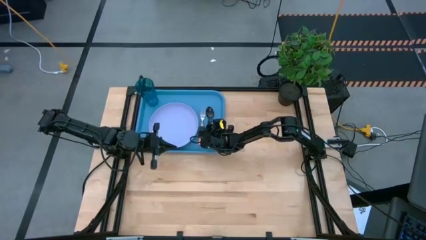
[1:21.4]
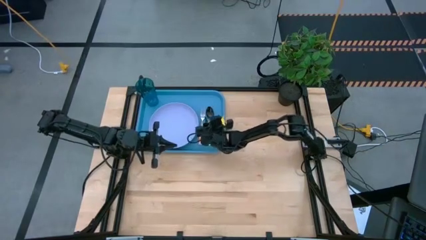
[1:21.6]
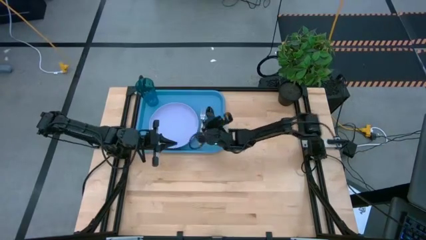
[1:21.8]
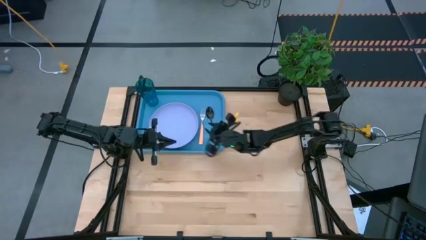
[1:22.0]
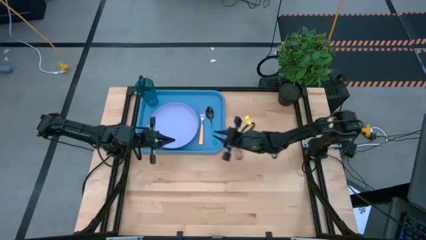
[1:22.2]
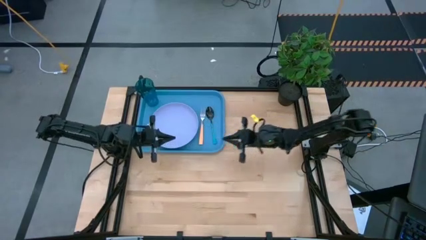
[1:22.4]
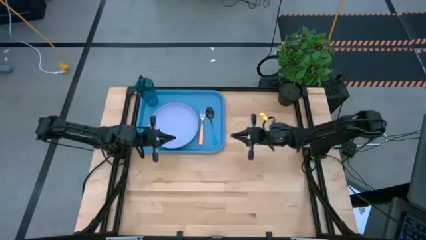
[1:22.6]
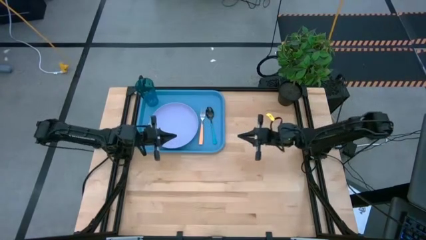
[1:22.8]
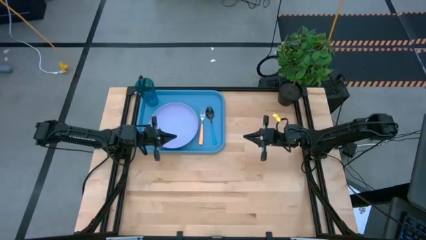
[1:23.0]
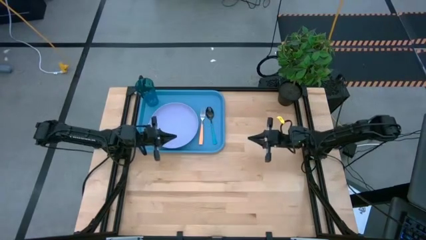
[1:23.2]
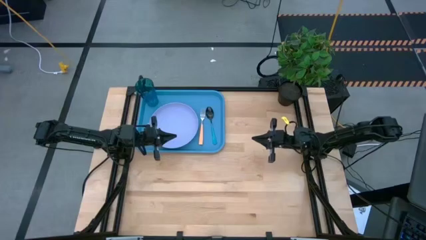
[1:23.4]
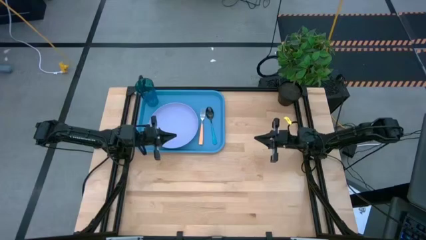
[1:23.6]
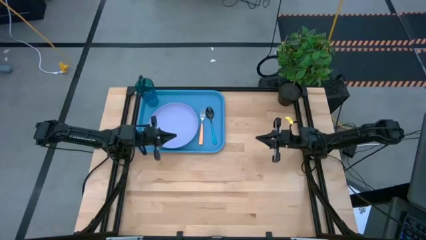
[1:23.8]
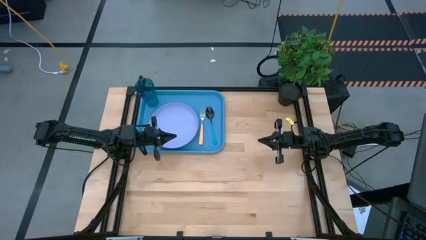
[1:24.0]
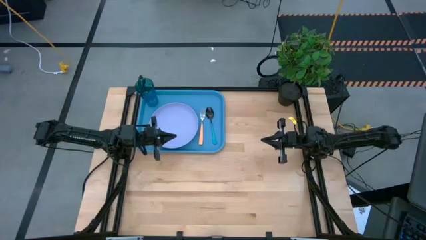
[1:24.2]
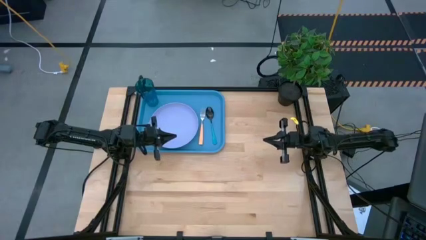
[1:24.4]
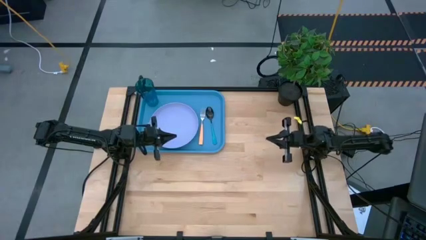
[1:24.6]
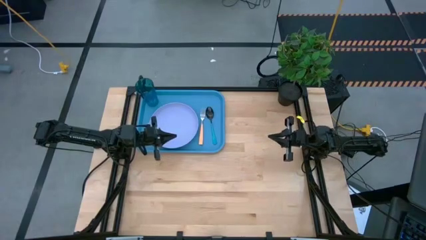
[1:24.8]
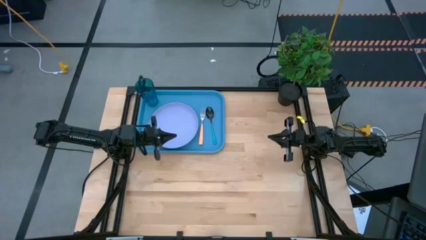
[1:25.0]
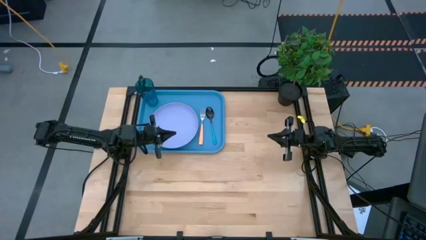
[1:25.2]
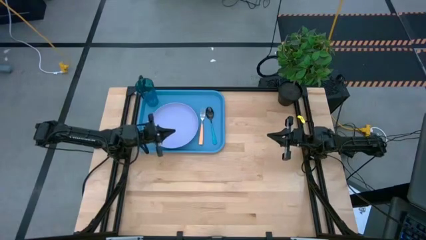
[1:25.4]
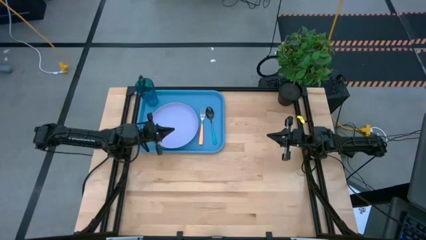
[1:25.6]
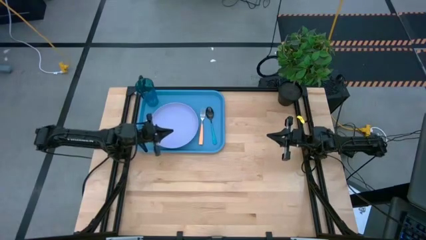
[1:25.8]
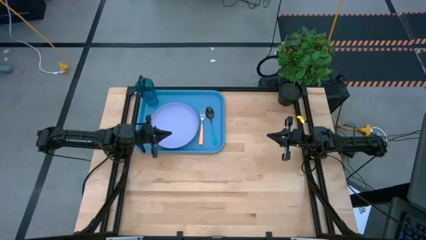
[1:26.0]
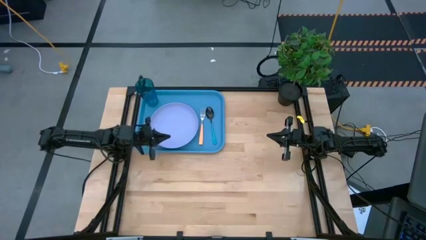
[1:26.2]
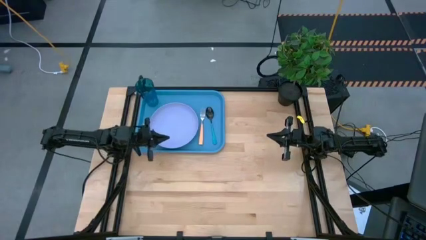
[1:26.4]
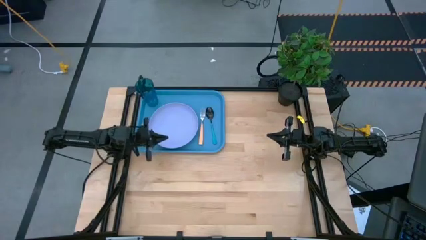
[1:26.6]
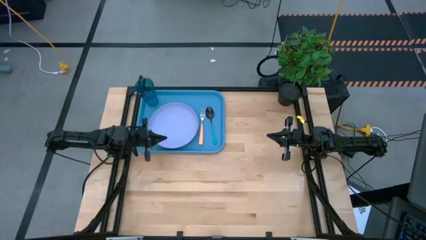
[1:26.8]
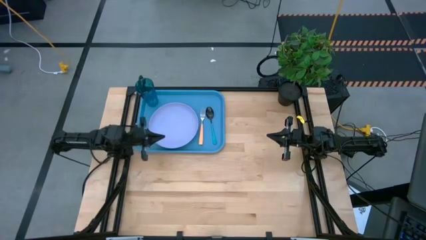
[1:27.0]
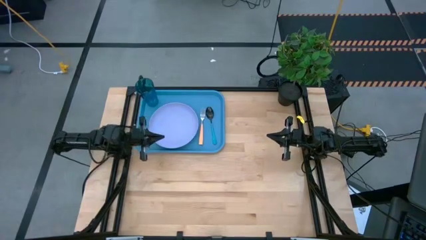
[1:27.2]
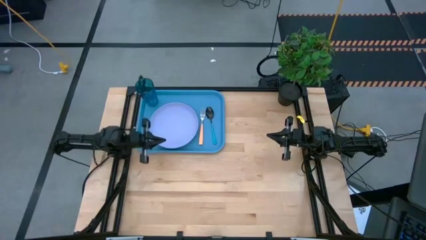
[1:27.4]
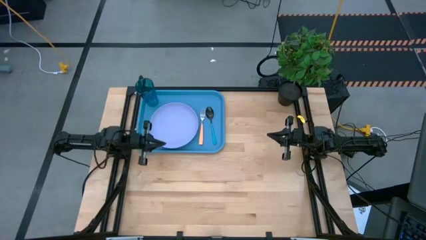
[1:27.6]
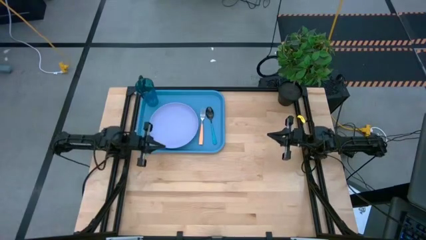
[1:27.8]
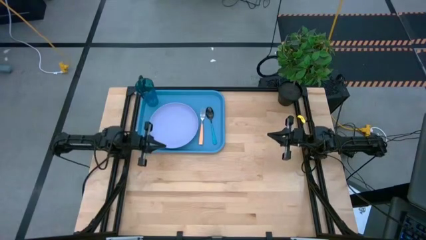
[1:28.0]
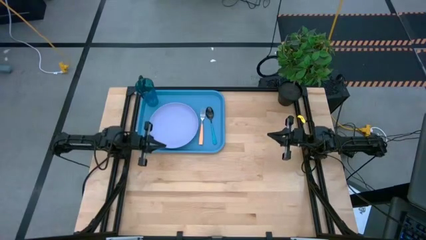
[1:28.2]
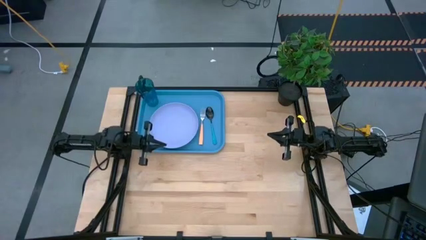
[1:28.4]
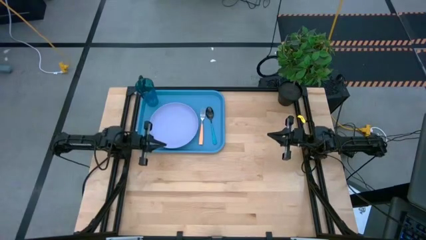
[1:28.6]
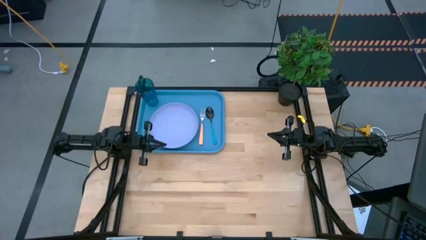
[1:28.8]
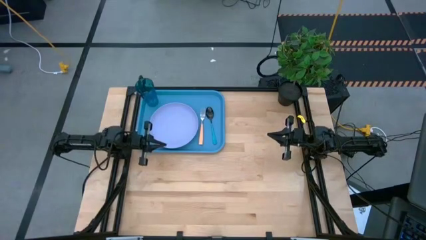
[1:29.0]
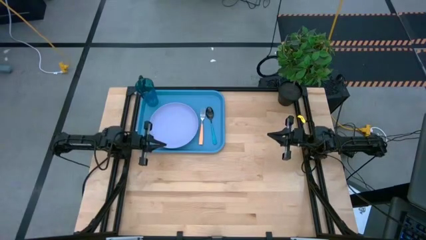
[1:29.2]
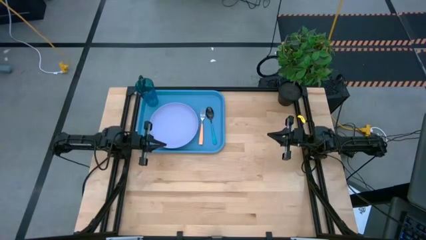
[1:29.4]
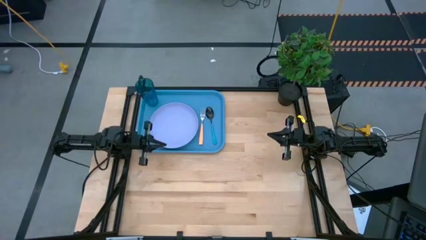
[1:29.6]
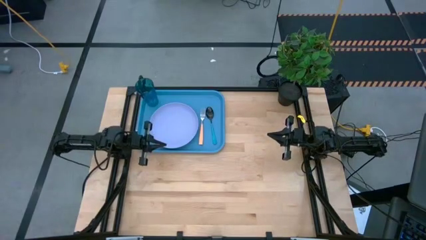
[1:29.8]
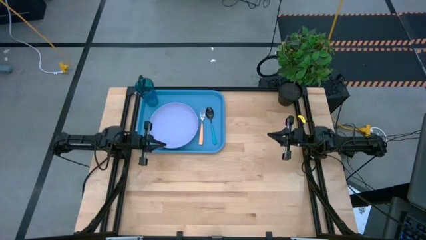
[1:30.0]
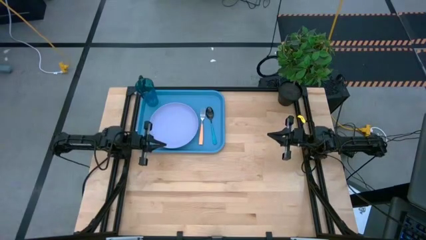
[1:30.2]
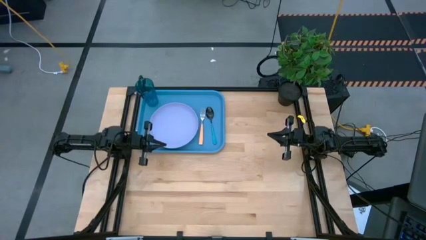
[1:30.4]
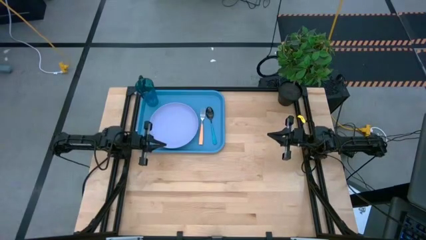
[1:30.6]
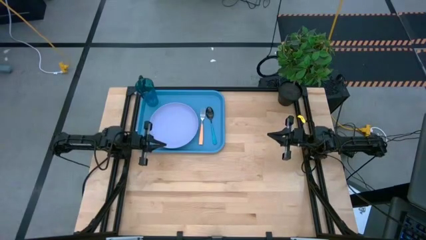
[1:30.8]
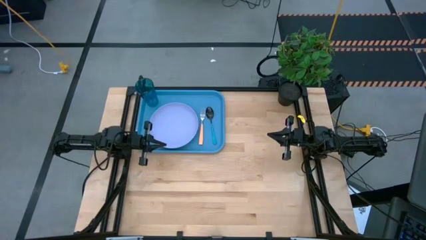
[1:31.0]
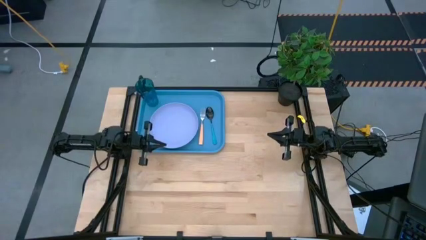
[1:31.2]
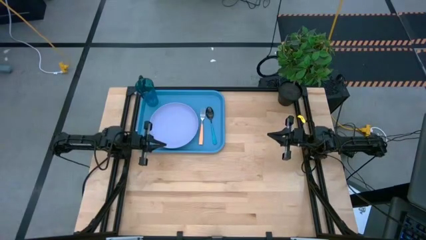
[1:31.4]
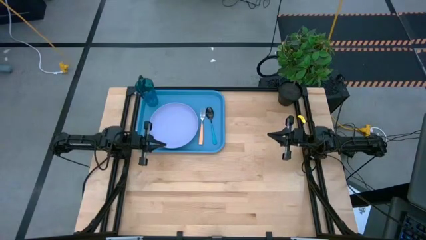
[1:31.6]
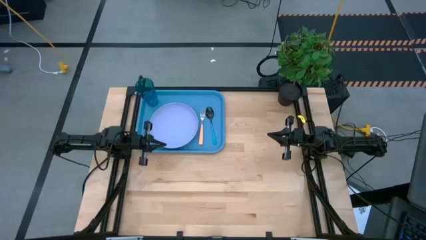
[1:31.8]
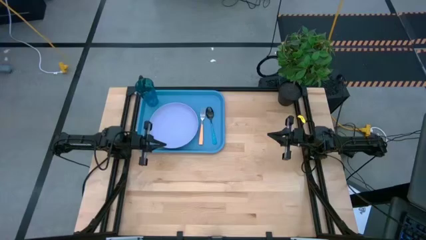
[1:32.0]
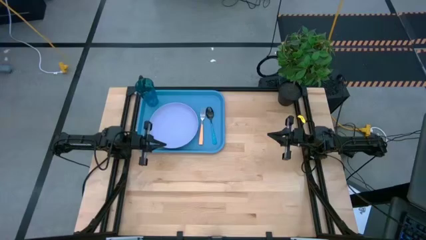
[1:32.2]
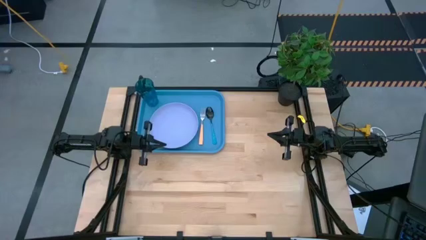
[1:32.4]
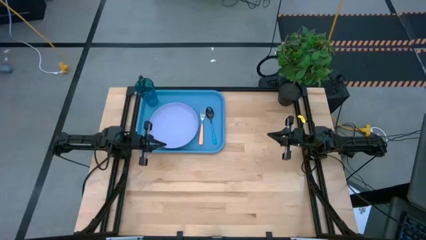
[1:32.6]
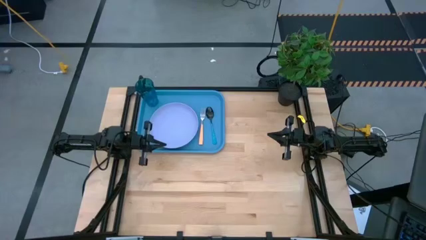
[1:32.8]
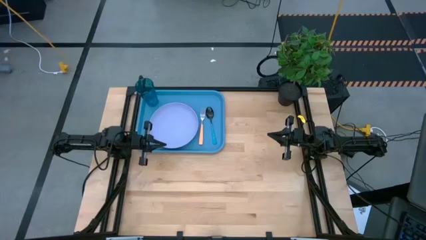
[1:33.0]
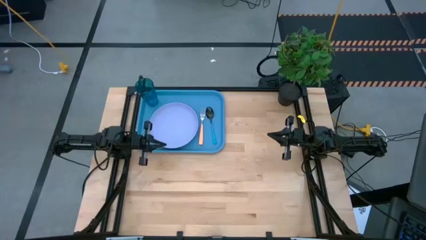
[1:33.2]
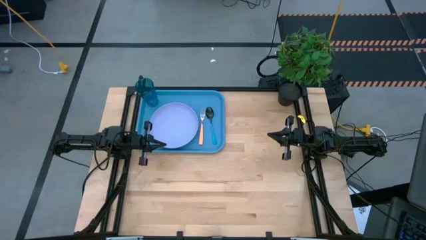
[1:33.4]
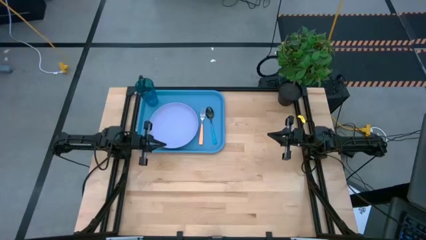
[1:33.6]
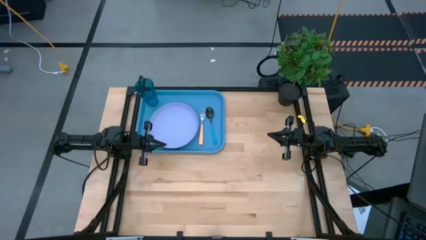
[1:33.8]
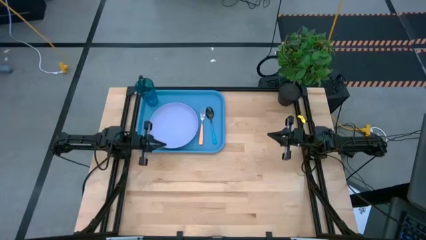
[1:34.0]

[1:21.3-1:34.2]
Task: Pick and place plate/cup/fork/spoon on tray
Return to Home Position

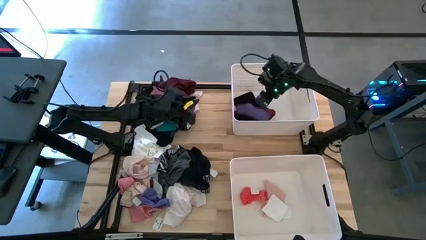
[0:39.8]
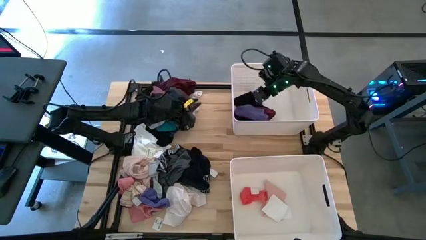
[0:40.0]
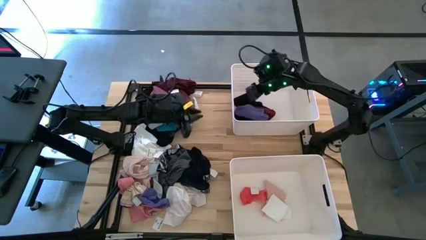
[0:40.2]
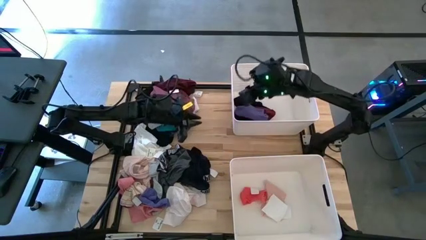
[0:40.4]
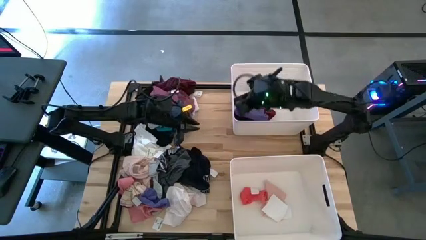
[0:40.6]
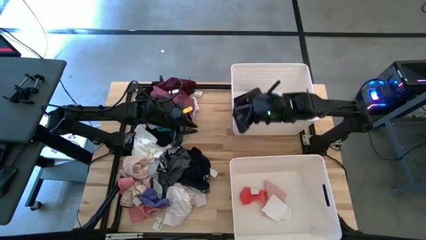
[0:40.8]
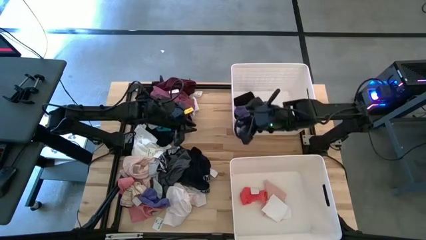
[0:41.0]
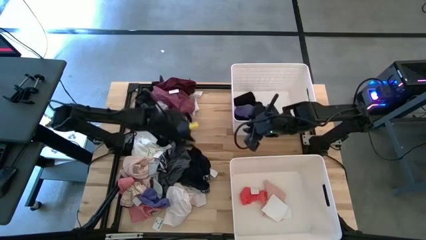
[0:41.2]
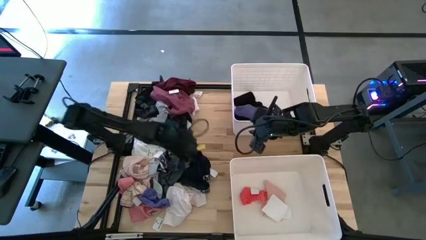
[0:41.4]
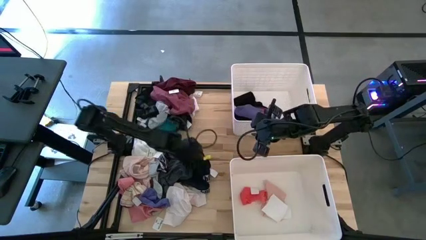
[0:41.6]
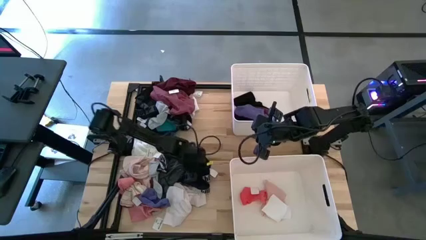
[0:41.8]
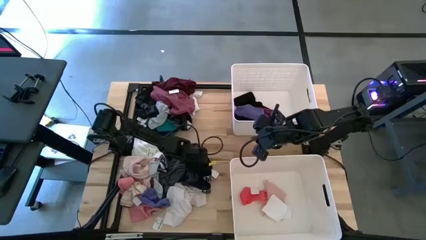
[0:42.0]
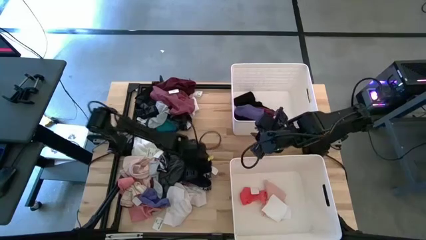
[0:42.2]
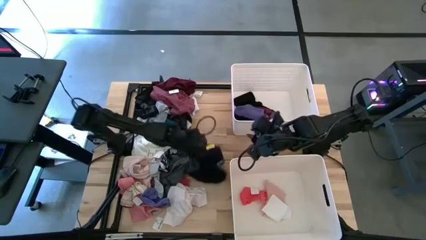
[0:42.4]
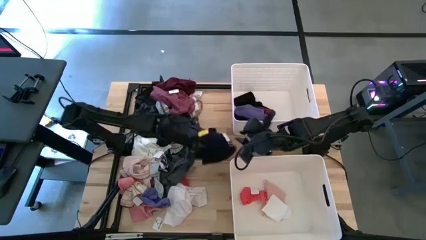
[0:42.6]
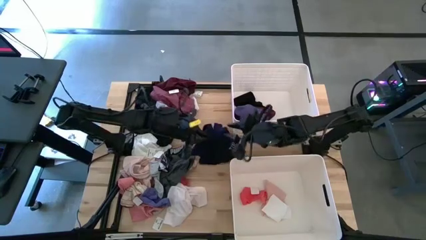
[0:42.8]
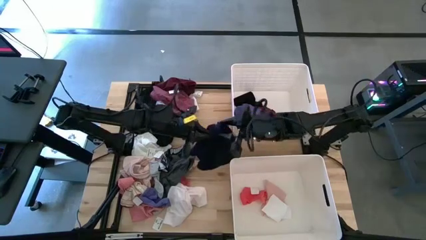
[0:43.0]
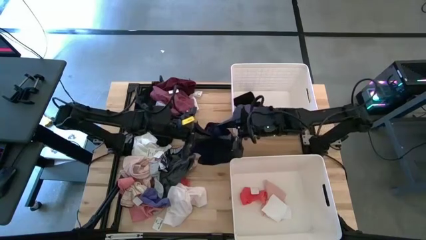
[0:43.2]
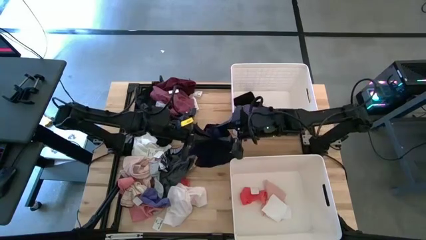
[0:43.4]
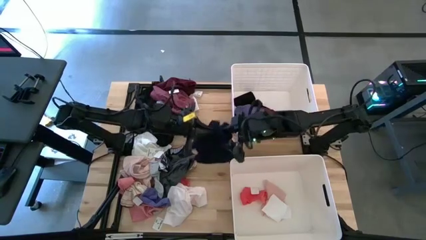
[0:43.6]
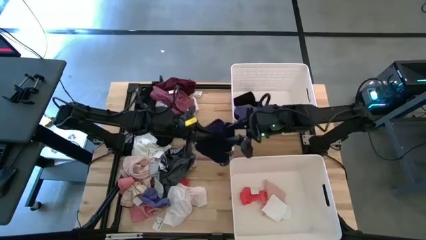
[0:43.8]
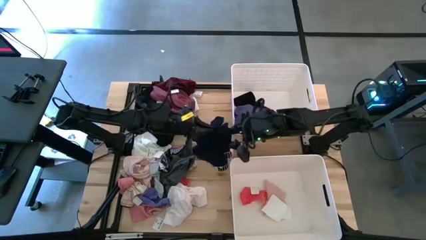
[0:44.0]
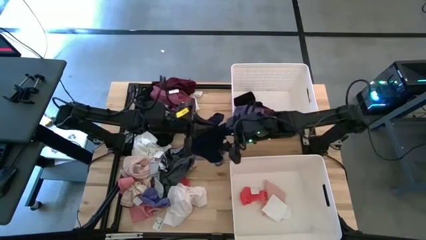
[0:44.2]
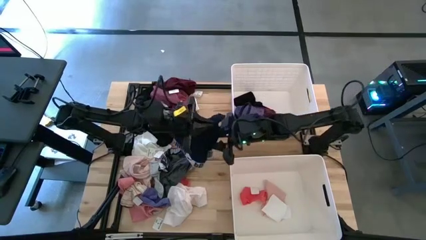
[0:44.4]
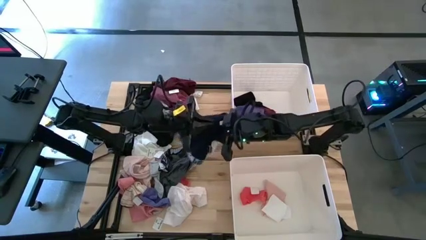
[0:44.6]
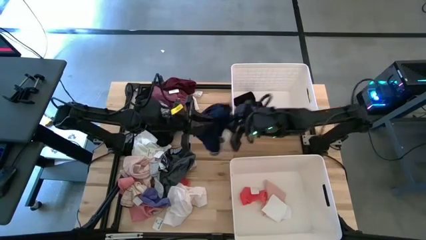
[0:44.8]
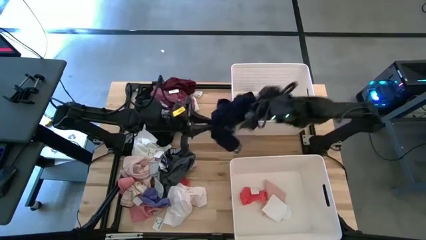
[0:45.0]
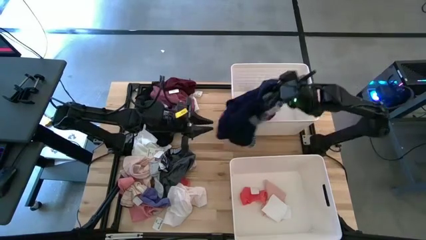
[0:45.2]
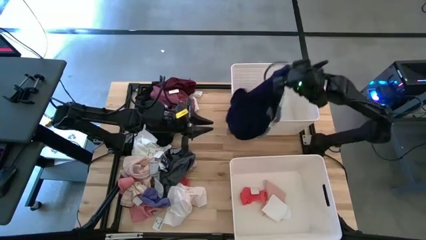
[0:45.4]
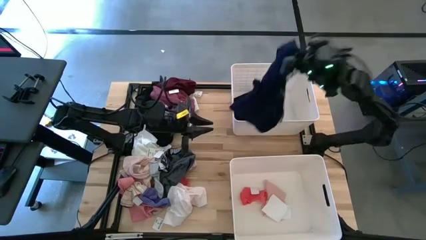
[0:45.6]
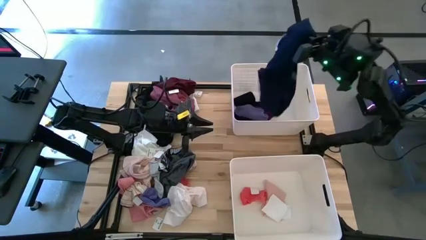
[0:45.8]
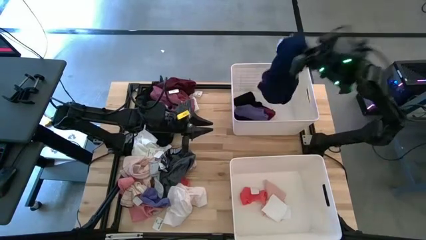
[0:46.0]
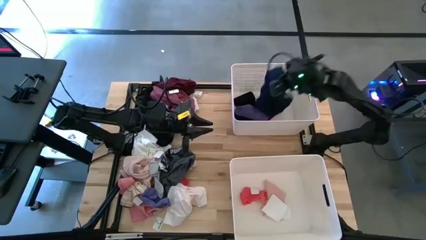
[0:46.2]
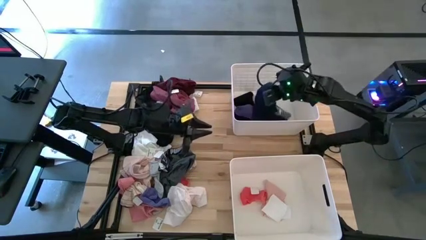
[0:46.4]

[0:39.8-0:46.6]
Task: Sort clothes
Put the black shirt into the top bin
